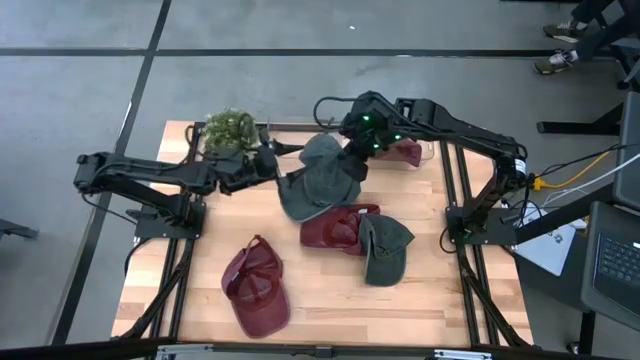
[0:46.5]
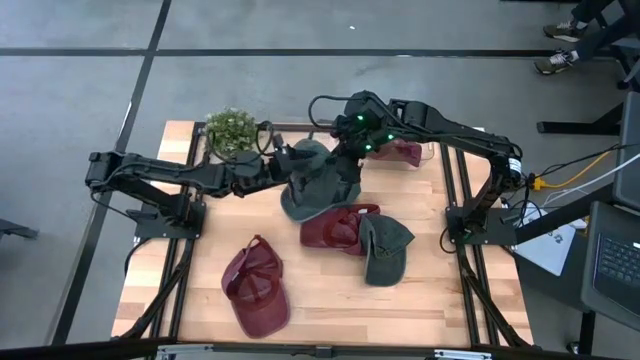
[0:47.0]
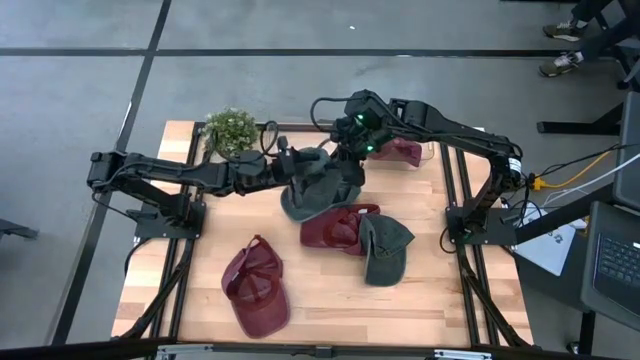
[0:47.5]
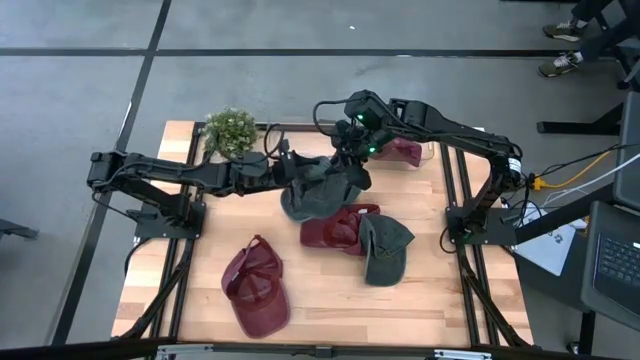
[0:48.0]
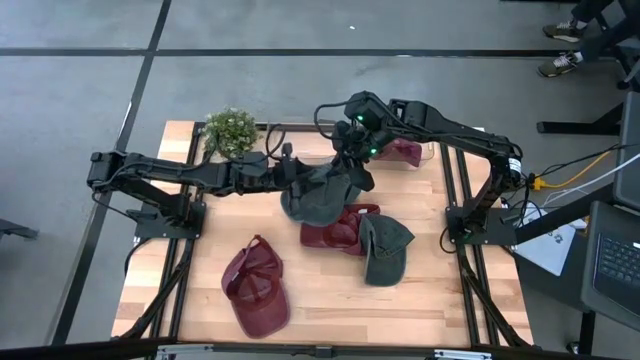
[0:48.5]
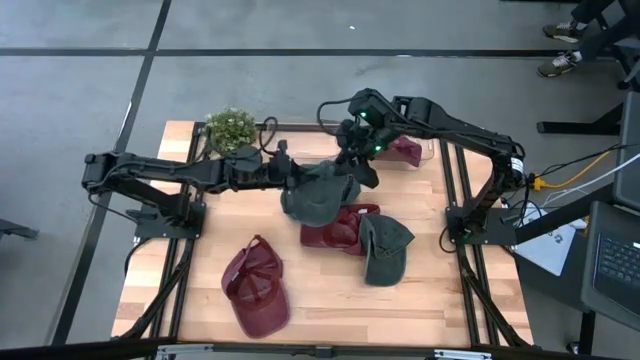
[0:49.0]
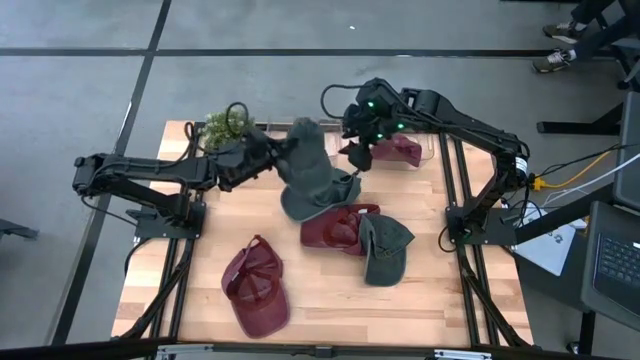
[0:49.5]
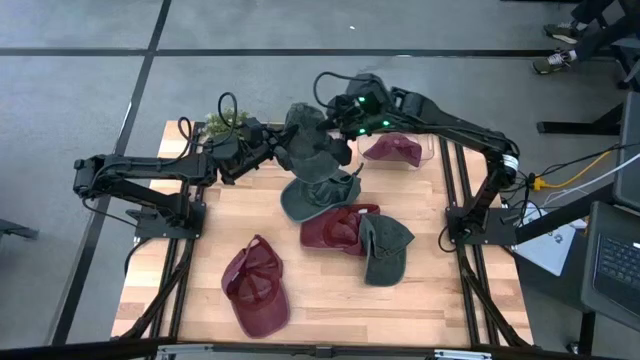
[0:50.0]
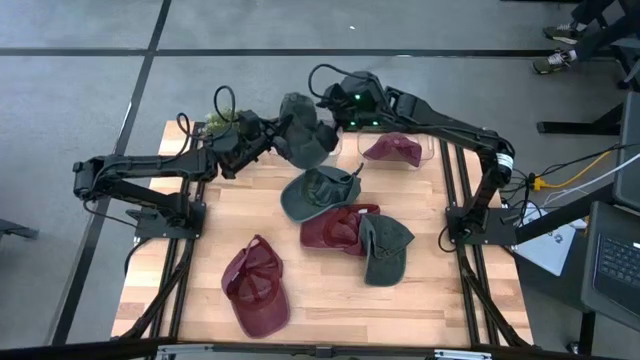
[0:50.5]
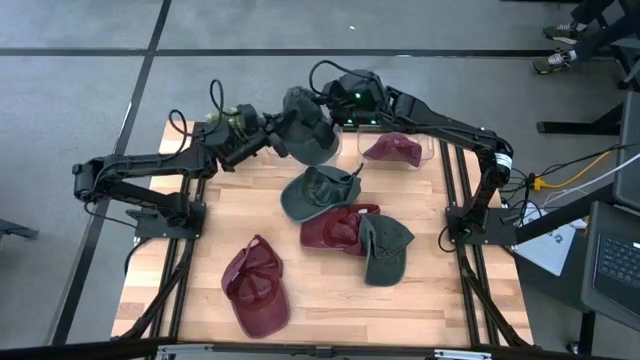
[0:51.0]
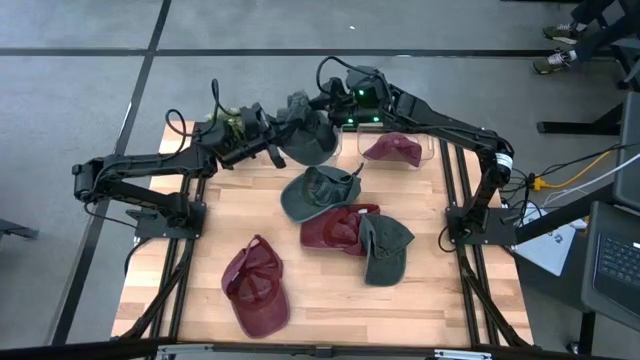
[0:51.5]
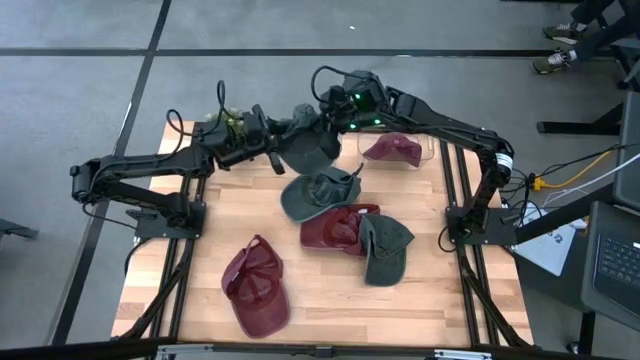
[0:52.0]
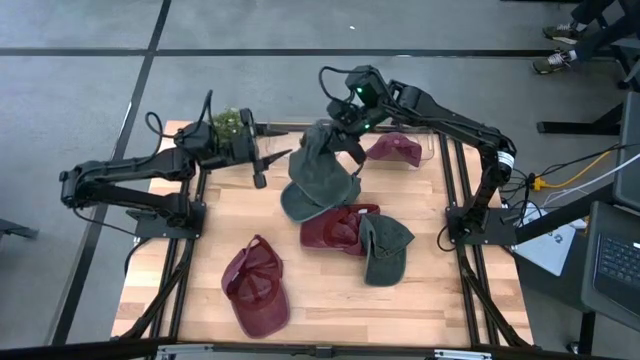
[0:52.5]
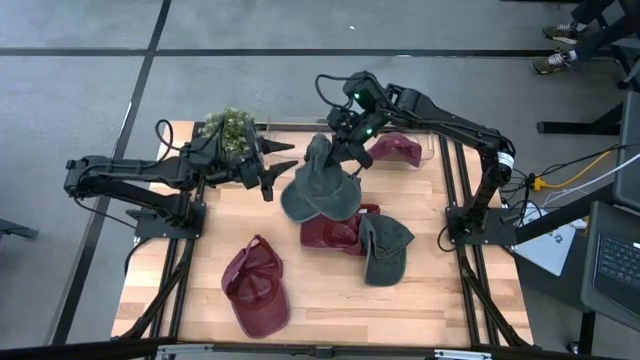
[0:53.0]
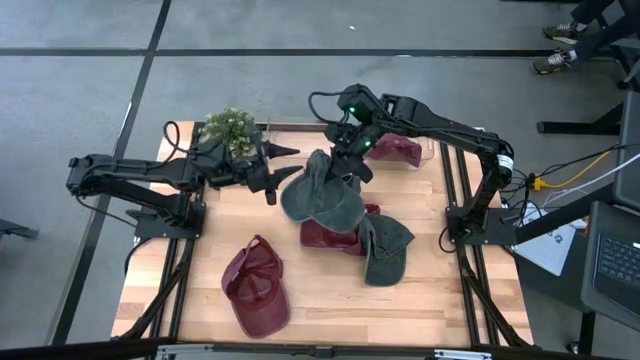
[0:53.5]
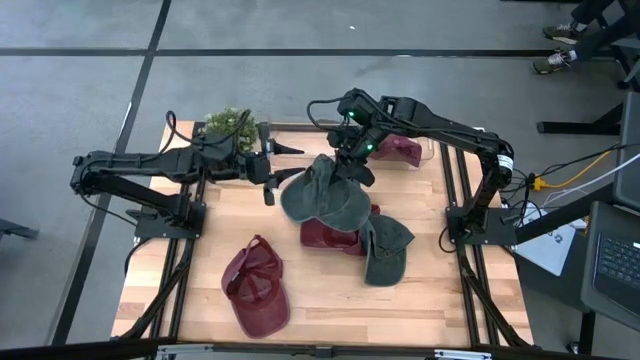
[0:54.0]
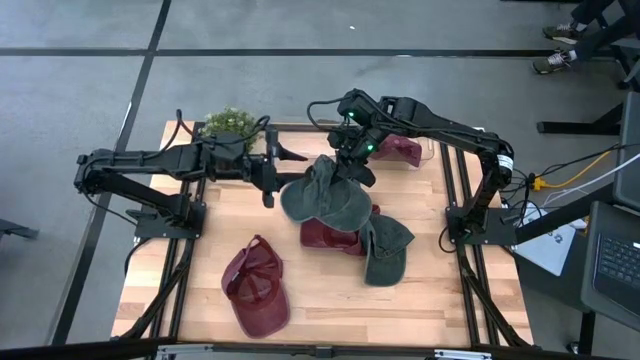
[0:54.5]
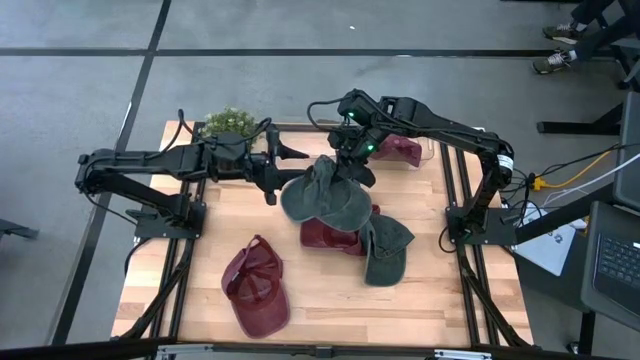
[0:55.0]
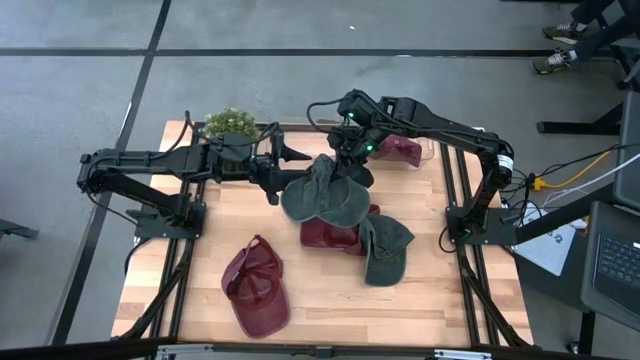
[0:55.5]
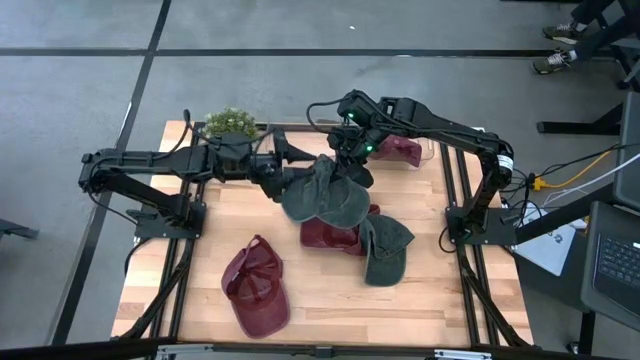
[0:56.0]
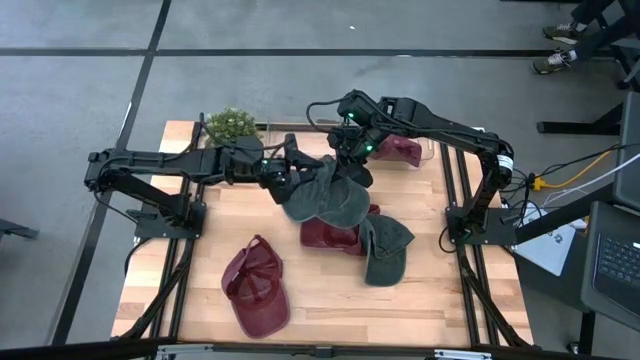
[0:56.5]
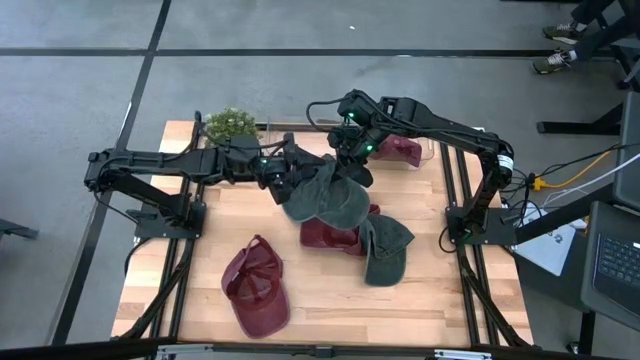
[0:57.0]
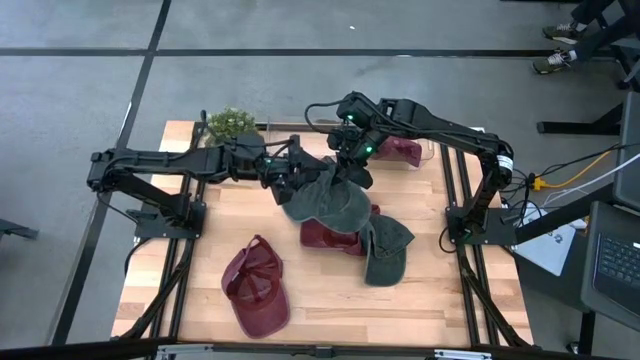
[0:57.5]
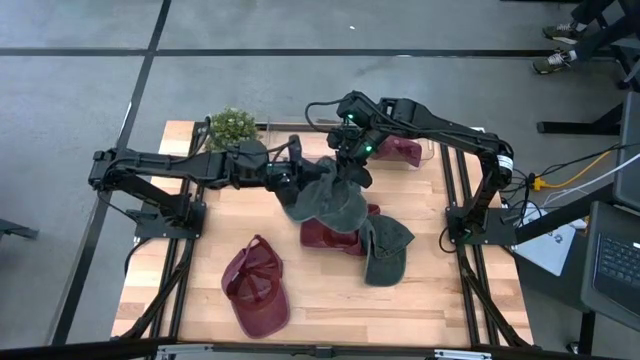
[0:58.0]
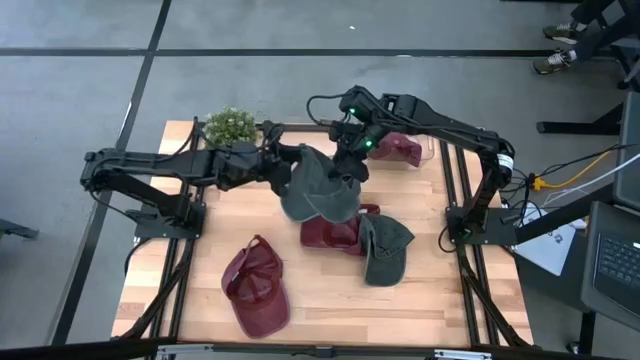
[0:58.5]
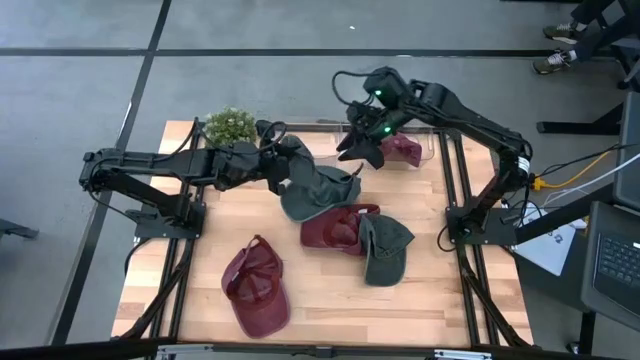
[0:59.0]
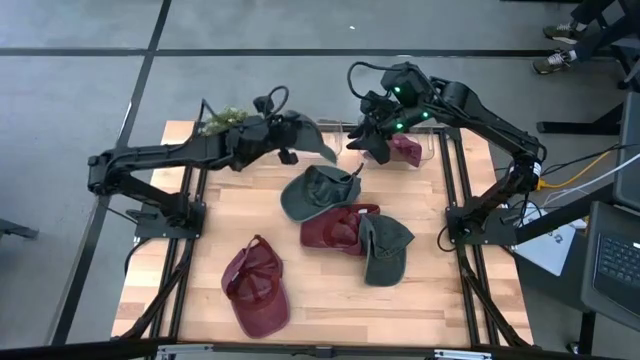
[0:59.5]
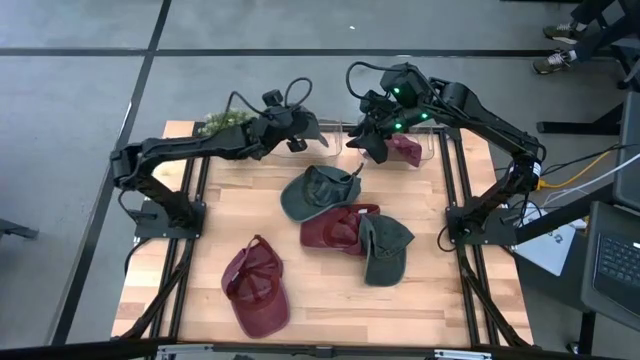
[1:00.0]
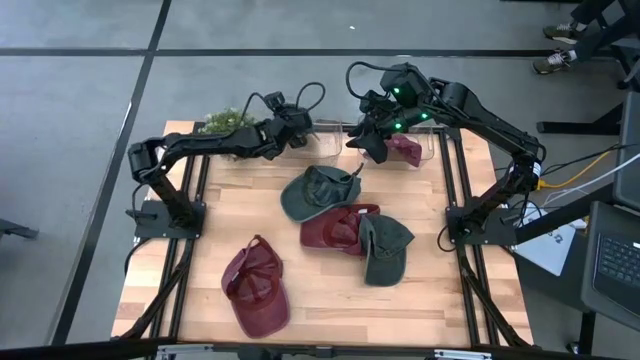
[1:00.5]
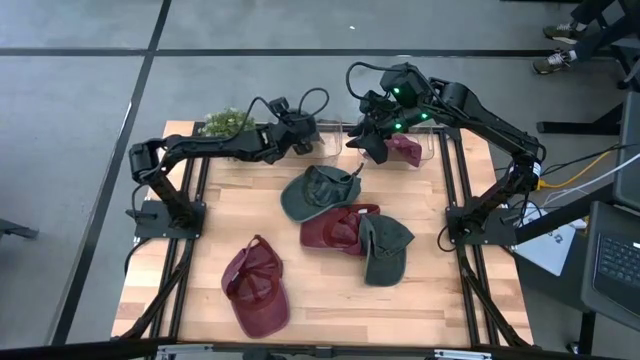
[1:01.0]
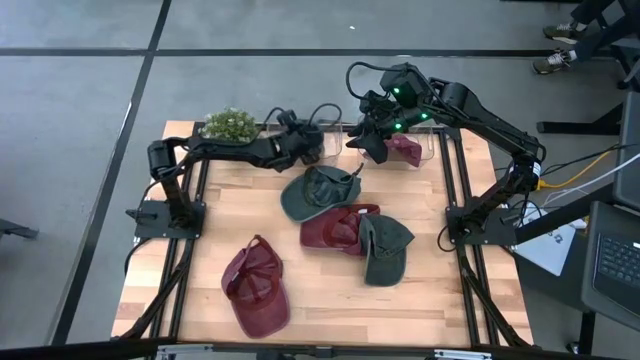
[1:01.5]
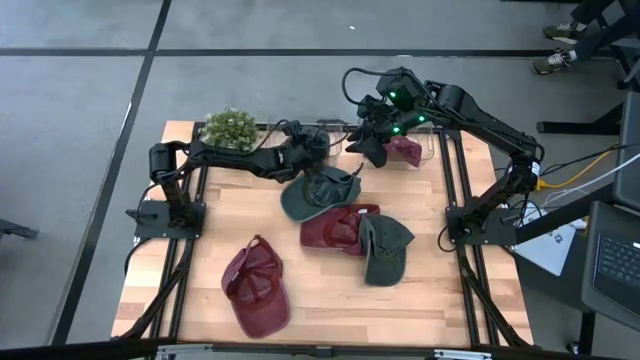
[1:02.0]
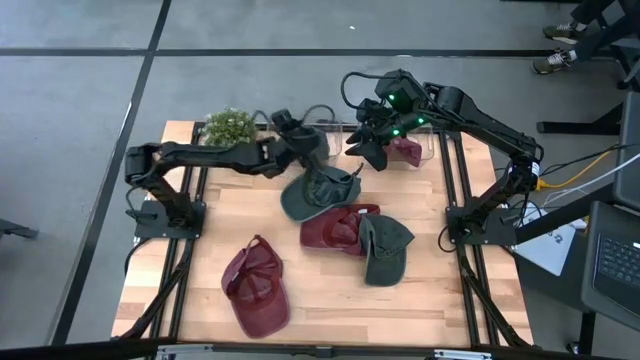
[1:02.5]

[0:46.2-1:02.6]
Task: Pick & Place hat
Put the bottom left gray cap into the left transparent bin

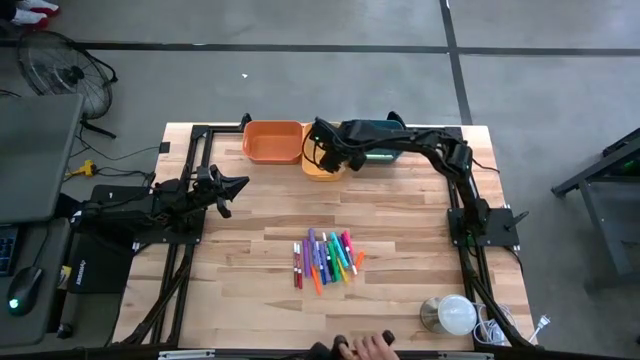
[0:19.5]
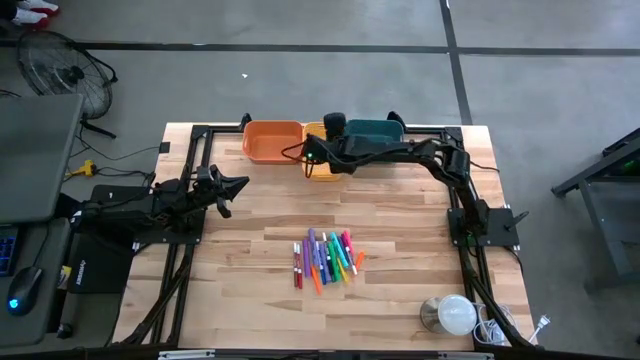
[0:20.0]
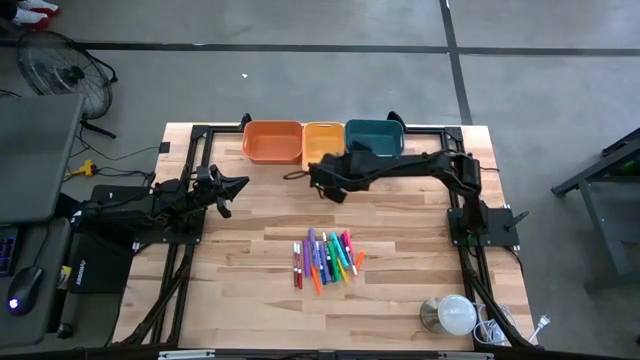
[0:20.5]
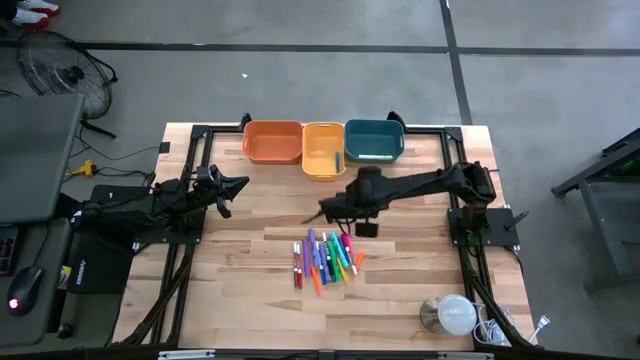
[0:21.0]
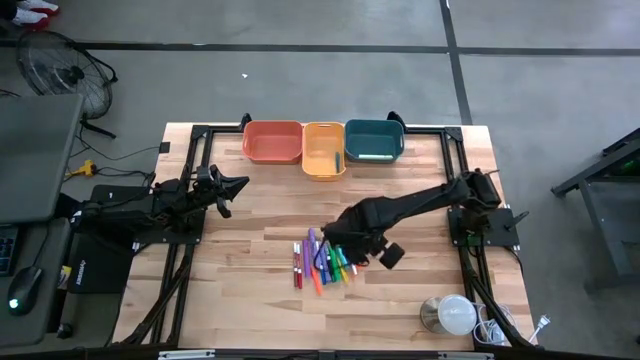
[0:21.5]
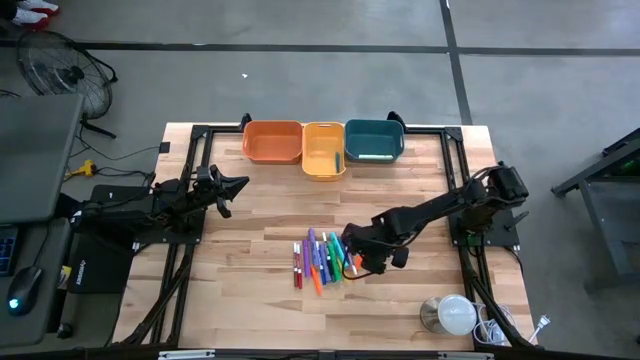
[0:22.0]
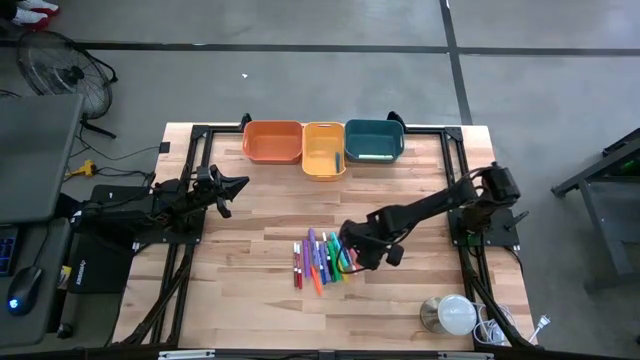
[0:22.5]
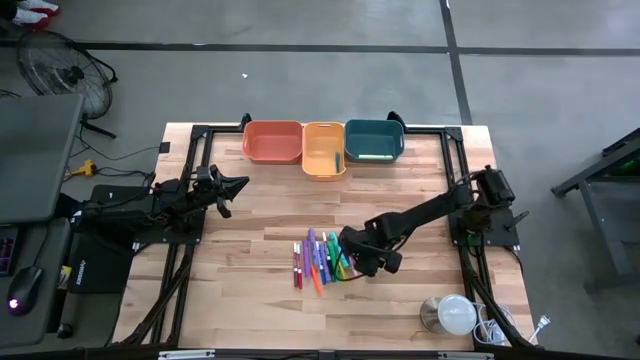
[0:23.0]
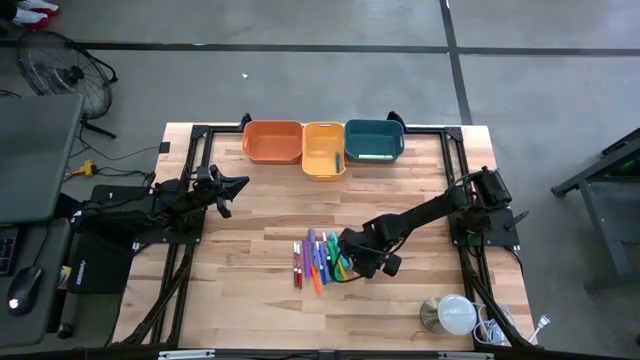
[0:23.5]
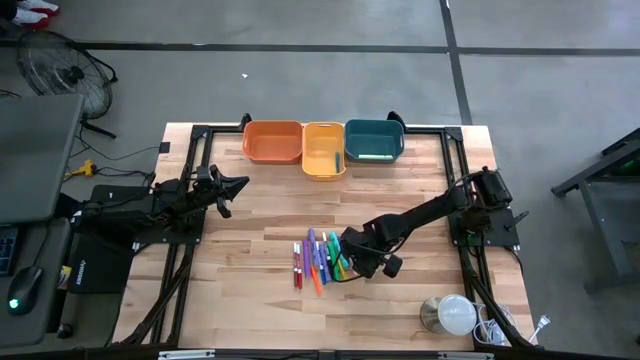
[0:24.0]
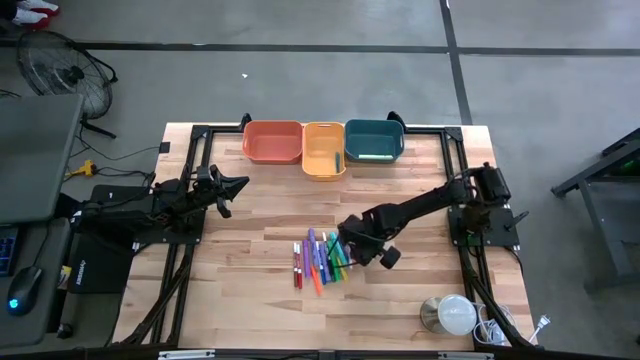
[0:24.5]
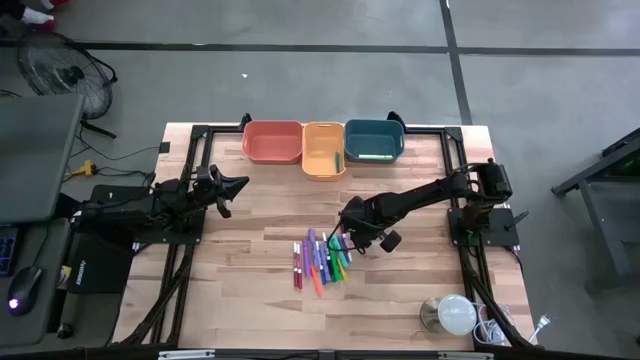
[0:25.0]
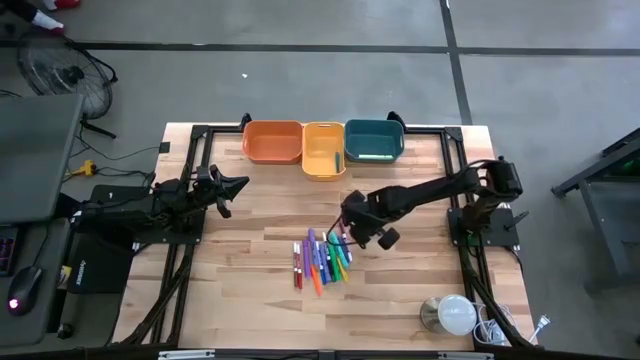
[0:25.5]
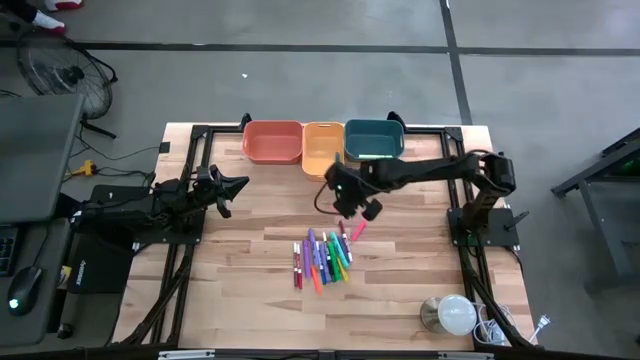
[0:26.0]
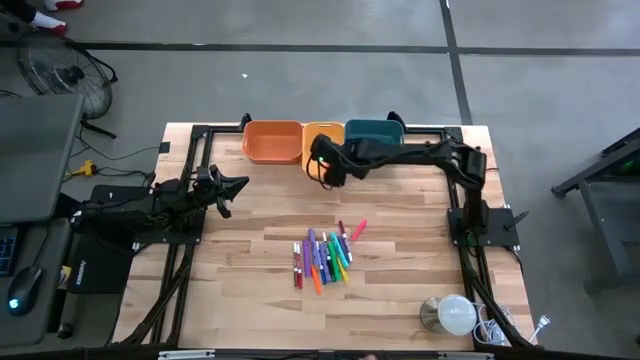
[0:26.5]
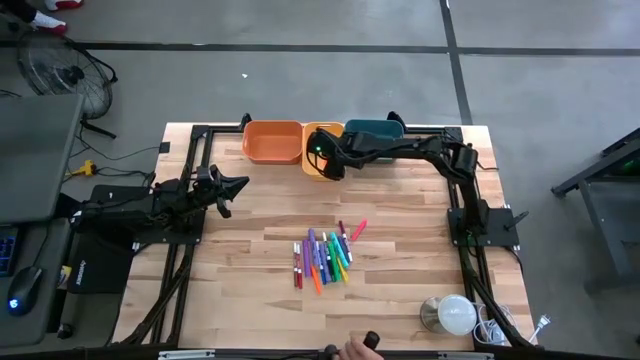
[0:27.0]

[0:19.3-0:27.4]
Task: Pick & Place Markers
Put the right orange pen into the yellow bin
